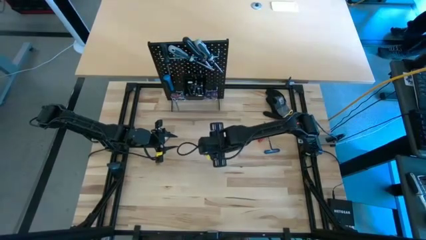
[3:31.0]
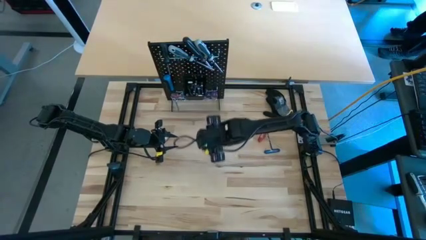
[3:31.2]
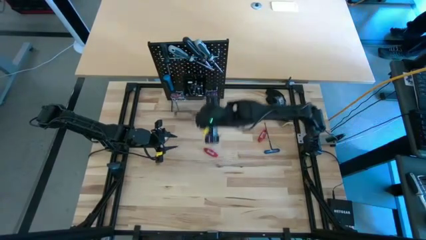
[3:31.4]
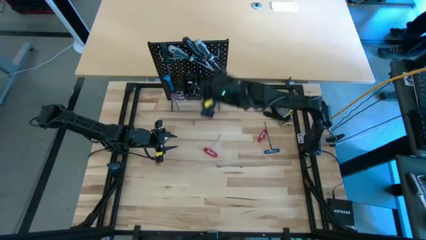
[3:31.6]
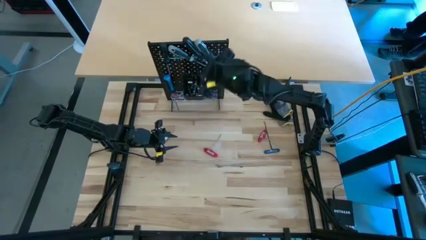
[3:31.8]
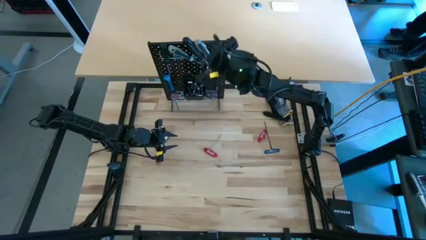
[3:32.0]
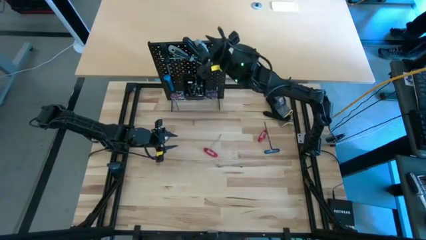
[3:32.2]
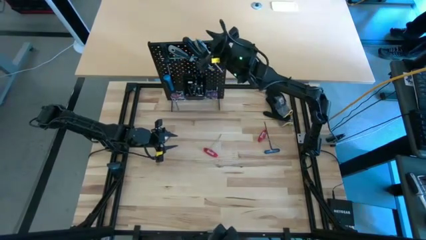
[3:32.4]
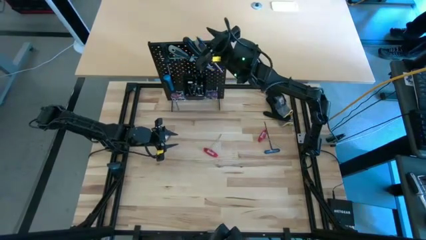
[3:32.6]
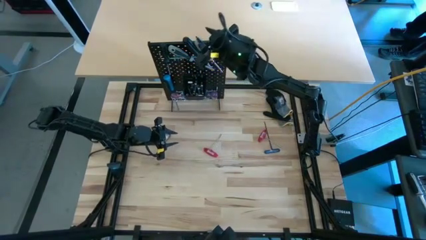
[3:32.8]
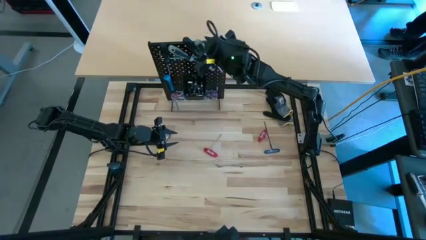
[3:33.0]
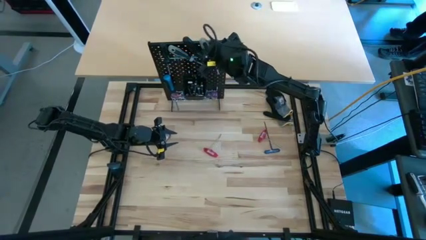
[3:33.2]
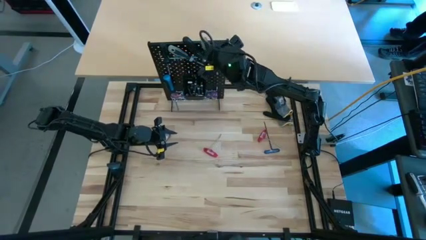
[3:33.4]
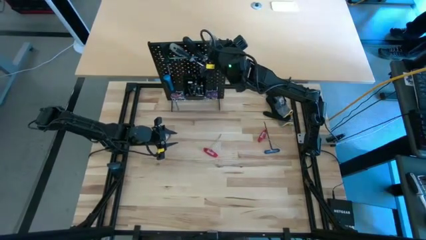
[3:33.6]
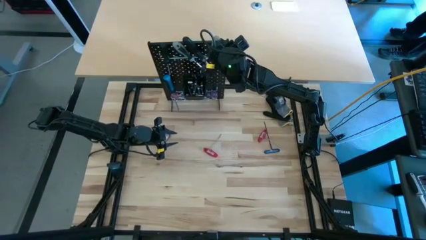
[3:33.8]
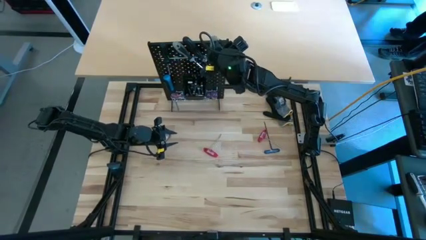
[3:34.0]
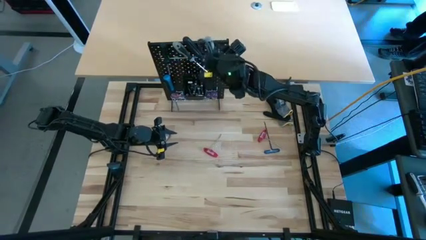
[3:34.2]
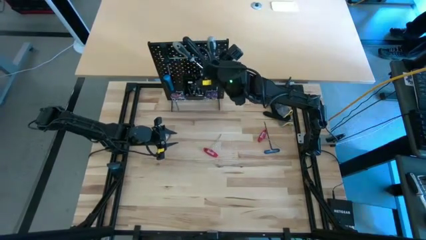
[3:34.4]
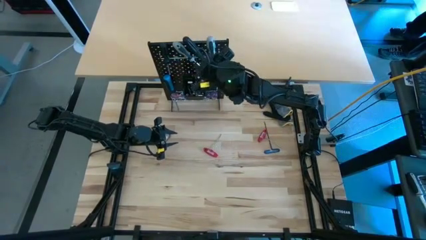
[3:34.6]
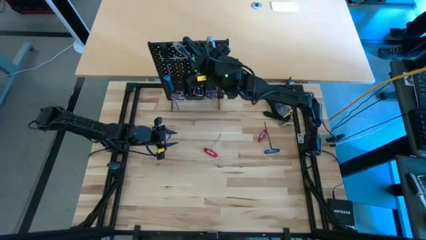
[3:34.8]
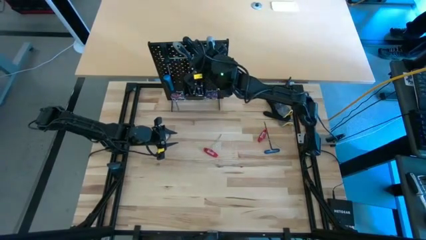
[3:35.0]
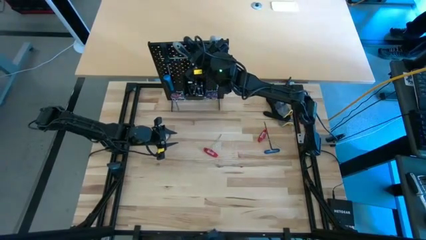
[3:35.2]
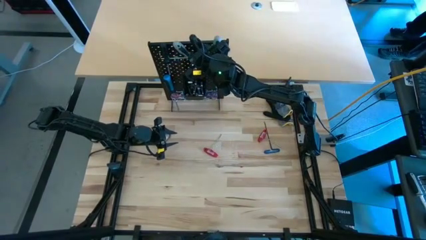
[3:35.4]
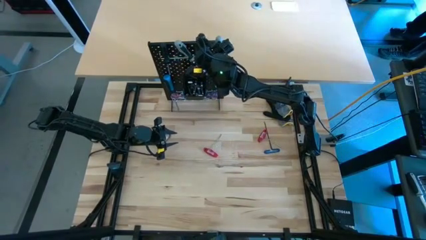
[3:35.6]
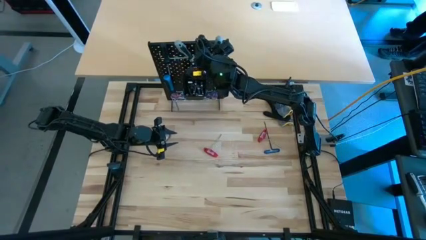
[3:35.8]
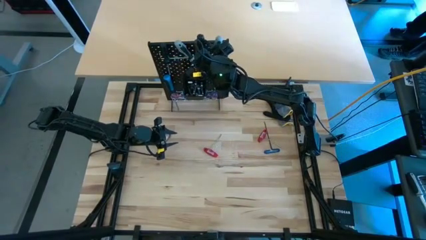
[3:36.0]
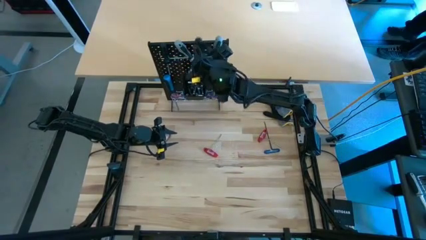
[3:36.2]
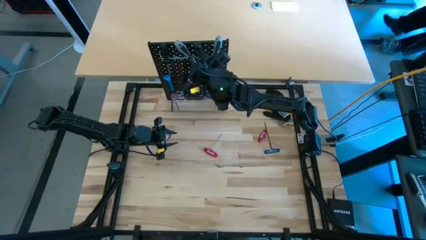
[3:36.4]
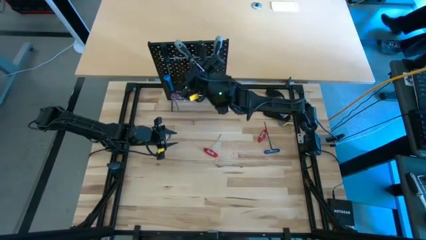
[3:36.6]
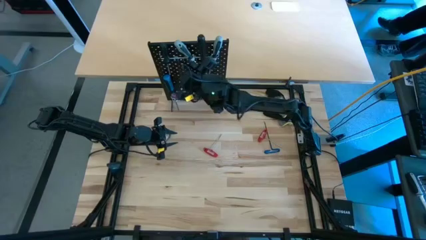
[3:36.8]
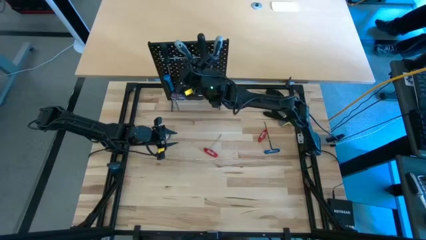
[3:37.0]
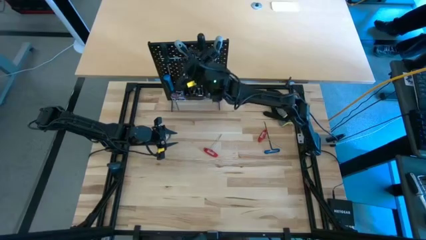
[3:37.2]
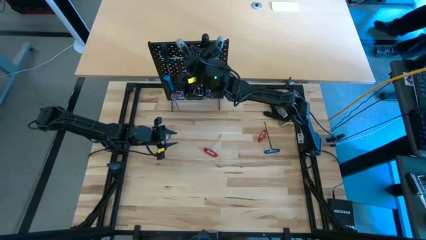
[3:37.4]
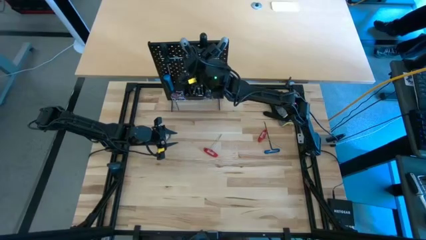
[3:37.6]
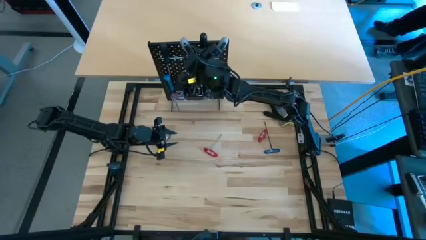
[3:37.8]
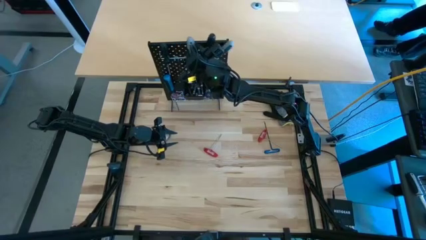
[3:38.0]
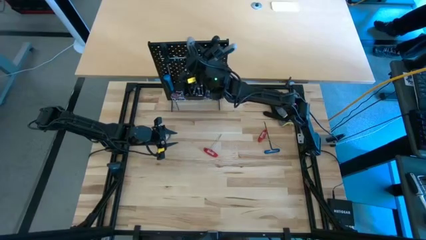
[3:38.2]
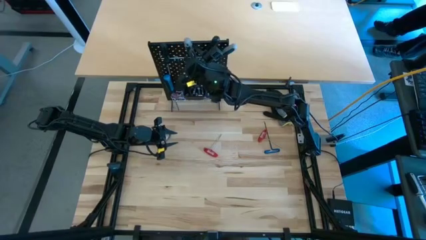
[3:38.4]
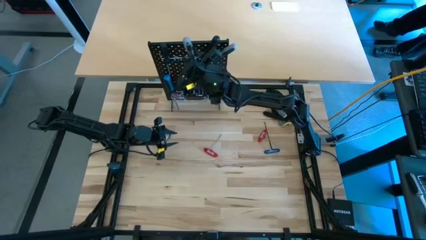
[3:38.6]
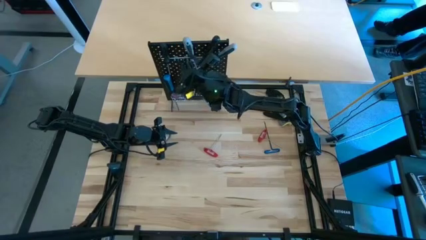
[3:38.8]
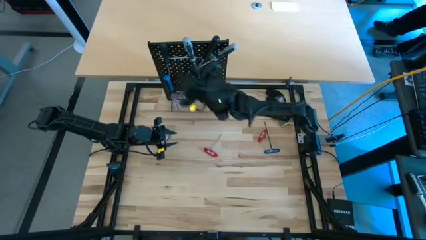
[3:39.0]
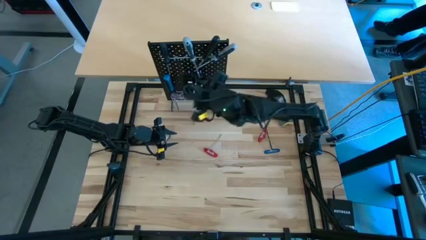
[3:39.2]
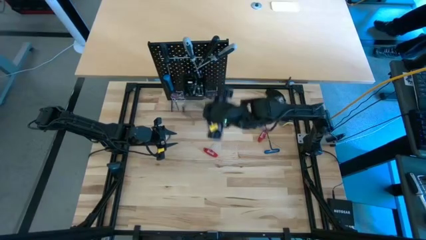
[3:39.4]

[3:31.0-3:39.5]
Task: Hang tools onto peg board
Adjust the screwdrivers

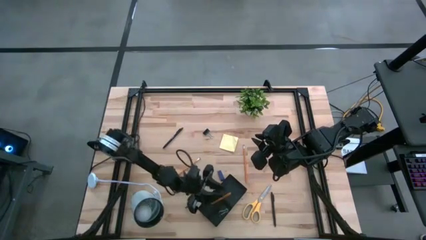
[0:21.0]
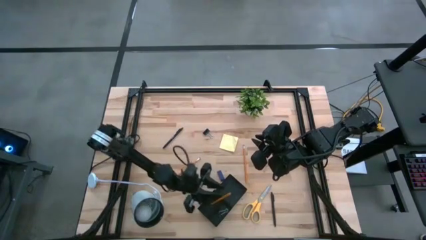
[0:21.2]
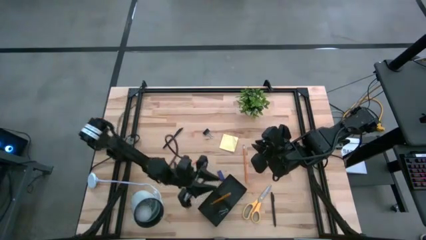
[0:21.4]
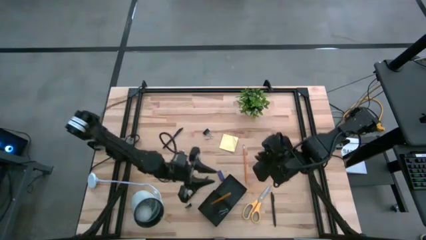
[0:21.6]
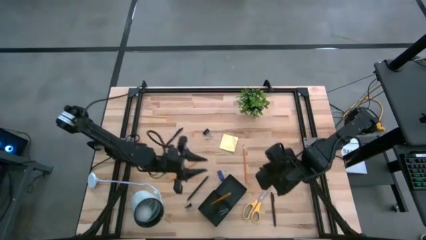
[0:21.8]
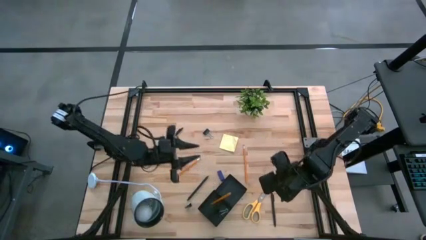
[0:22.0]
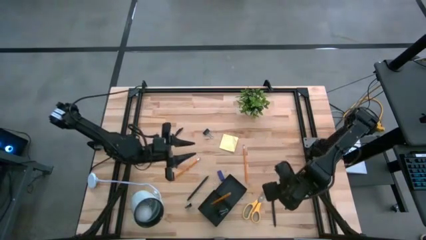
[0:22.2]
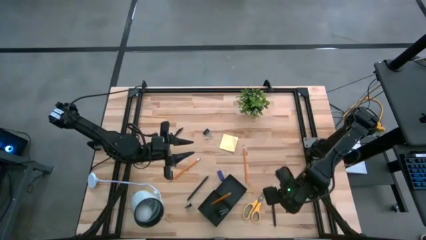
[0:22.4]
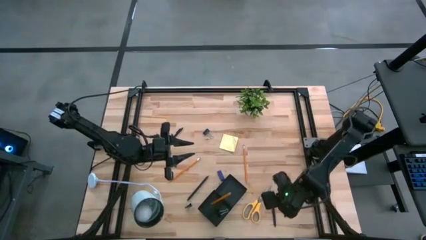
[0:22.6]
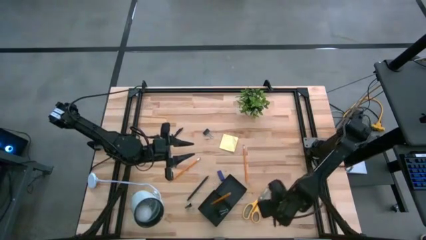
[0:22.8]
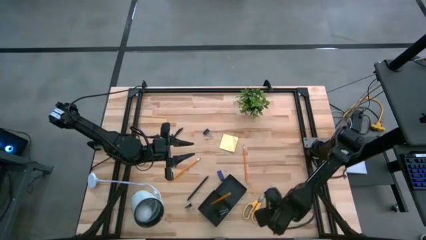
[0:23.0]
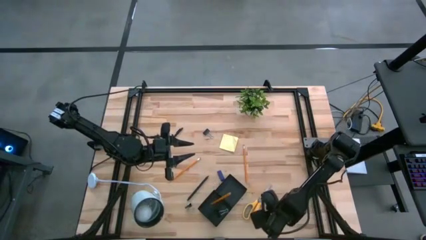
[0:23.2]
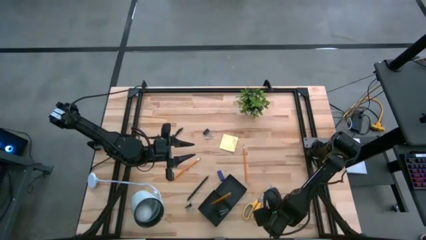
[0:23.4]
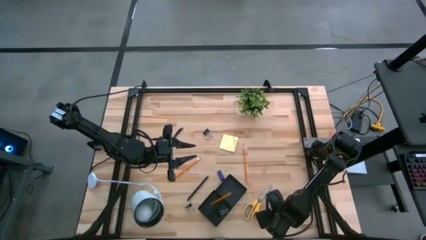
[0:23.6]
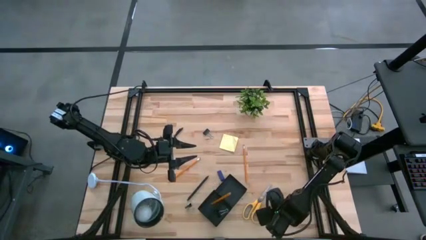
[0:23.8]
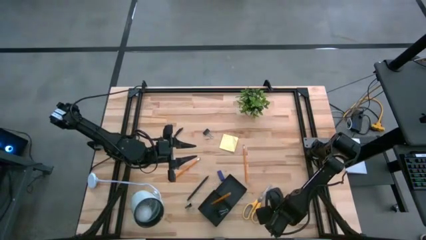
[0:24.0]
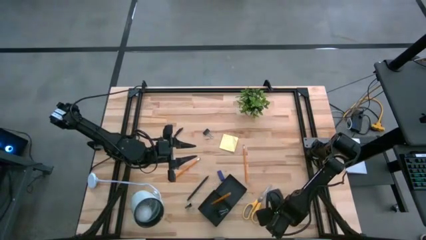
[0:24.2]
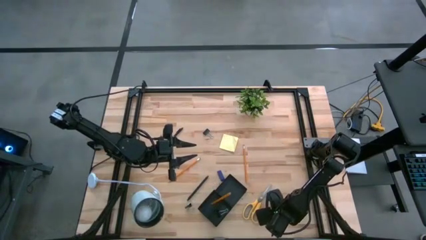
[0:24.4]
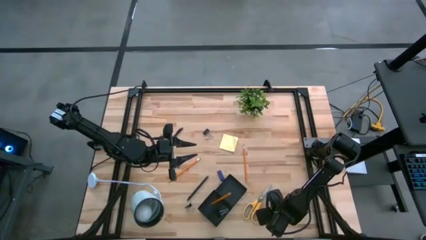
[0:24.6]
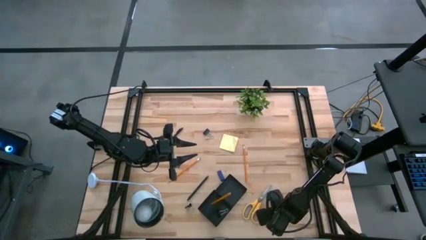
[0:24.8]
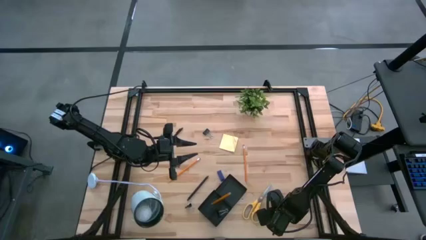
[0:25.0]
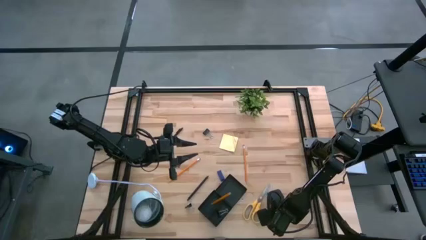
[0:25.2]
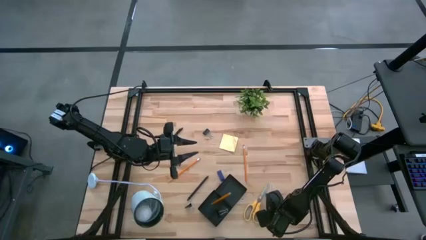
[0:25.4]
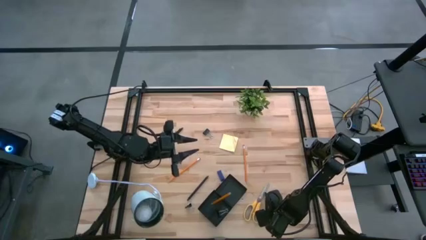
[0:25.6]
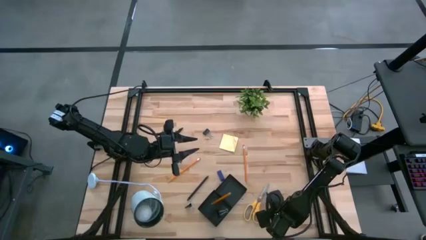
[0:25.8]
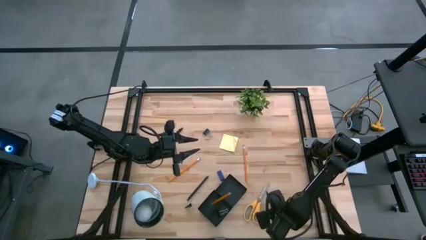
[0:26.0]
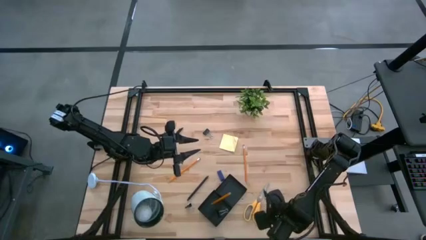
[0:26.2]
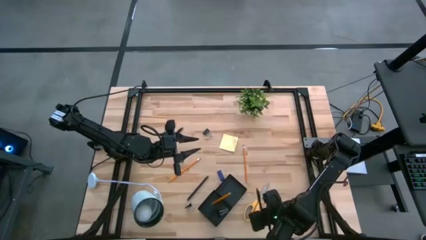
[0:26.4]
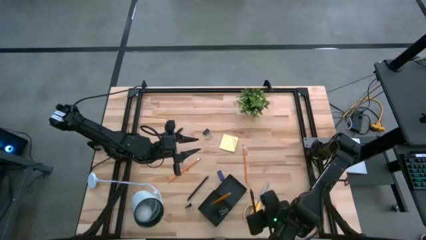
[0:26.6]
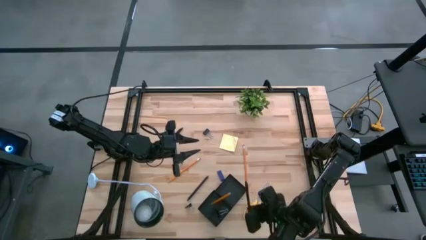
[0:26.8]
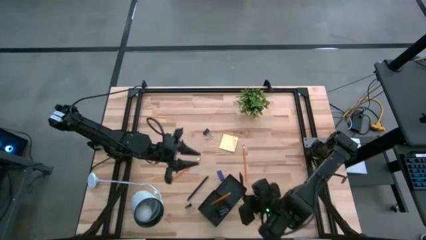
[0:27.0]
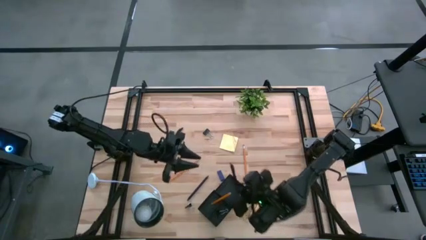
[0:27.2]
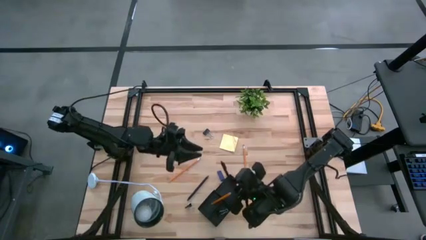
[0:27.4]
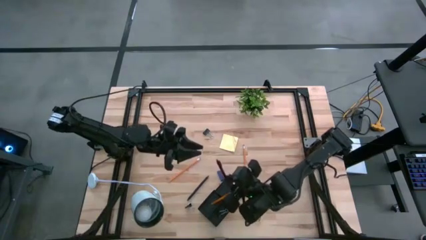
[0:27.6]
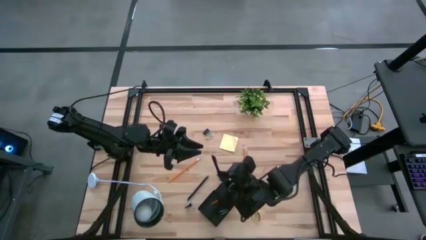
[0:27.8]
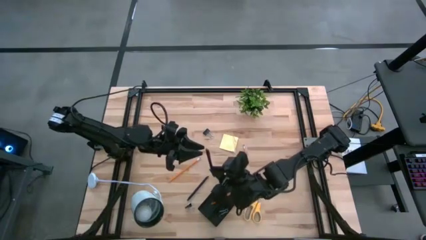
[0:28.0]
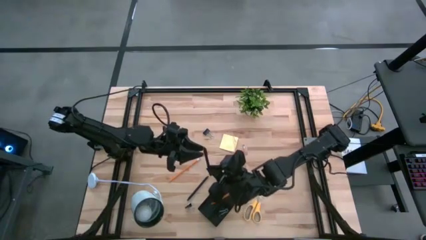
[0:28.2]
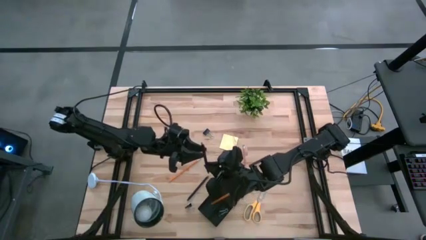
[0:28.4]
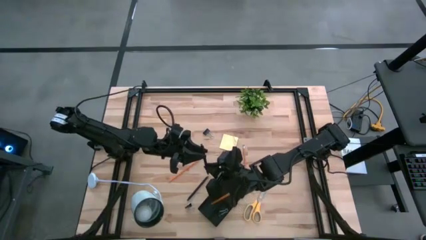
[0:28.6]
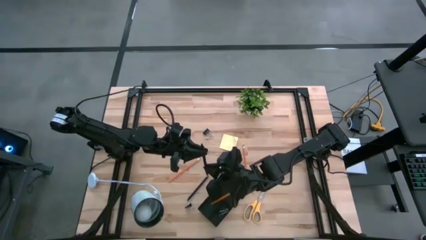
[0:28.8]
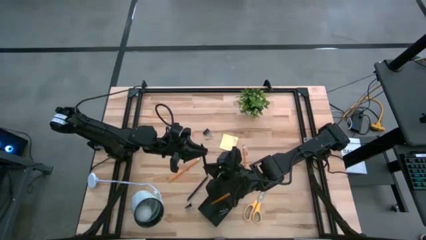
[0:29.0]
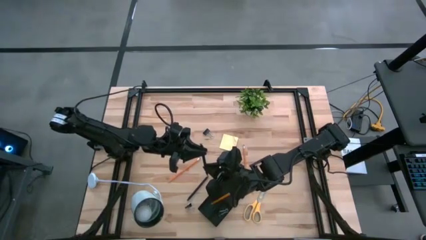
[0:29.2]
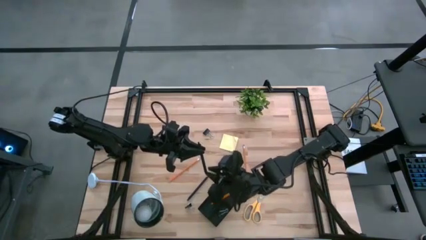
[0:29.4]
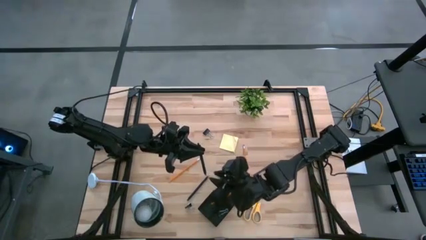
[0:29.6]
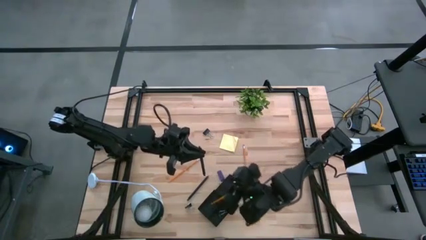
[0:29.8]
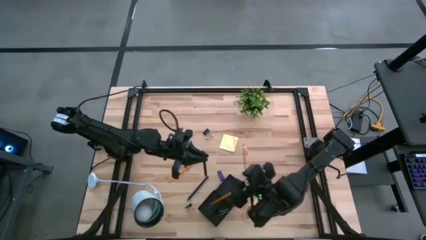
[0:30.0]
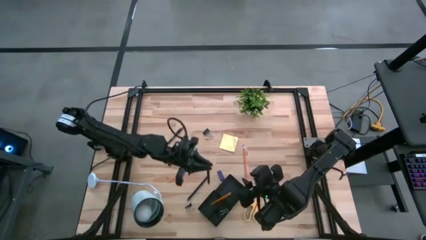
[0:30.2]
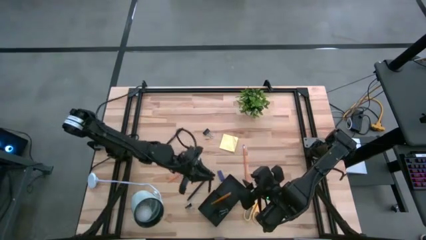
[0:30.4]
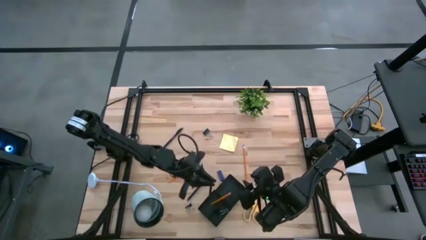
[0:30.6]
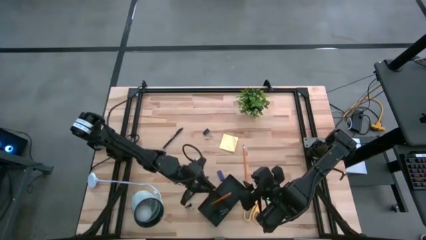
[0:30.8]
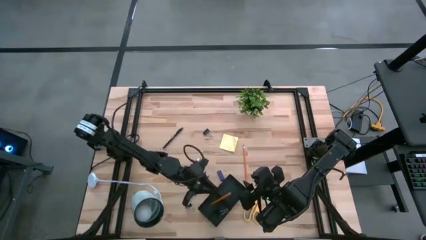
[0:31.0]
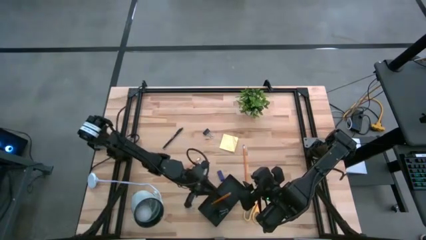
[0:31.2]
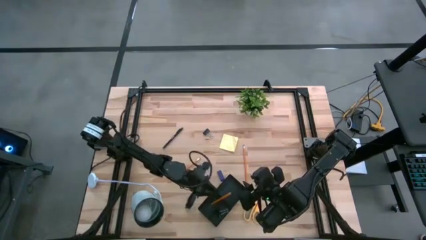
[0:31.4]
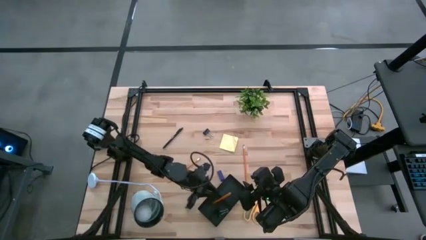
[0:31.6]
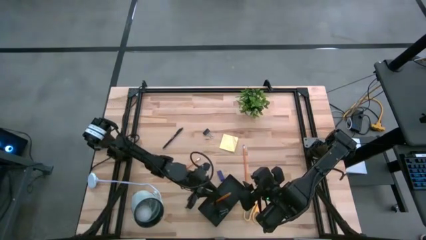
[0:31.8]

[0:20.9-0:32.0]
Task: Pick and place office supplies into organizer
Put the bottom pen into the desk organizer
